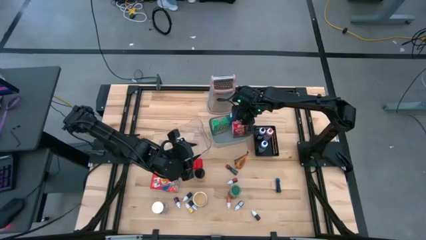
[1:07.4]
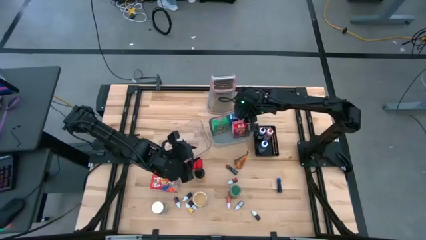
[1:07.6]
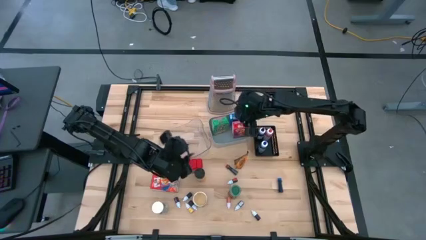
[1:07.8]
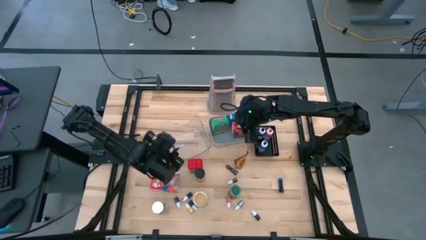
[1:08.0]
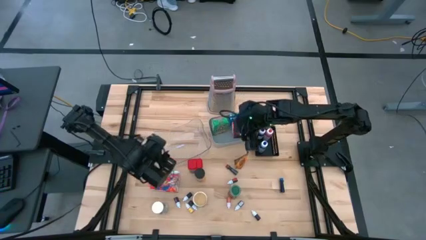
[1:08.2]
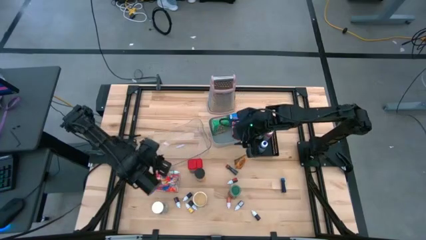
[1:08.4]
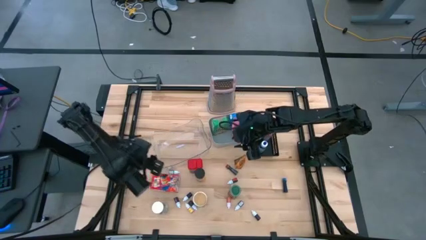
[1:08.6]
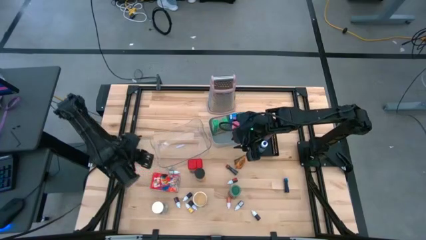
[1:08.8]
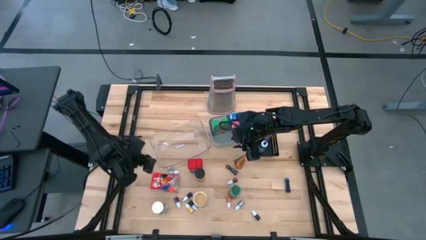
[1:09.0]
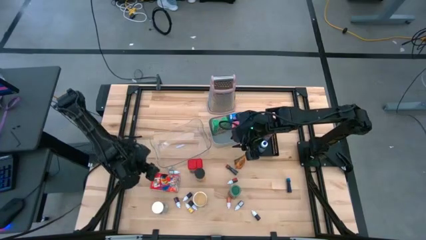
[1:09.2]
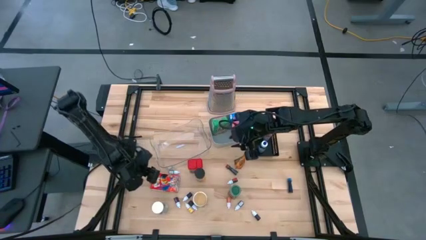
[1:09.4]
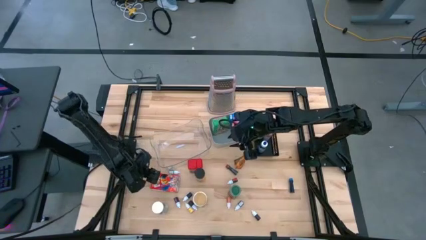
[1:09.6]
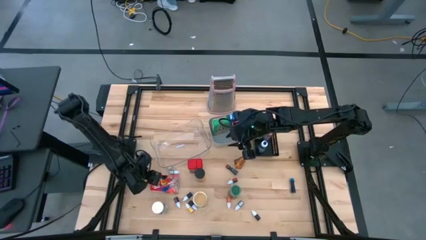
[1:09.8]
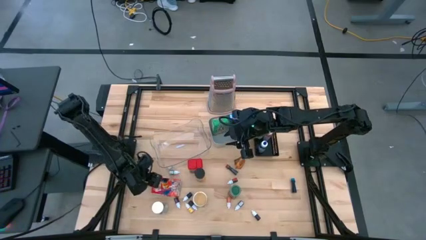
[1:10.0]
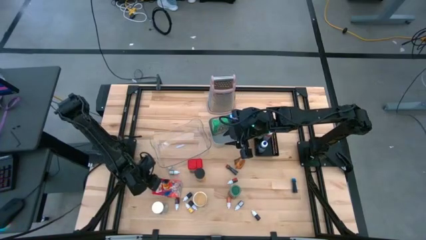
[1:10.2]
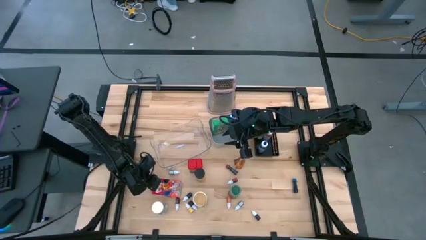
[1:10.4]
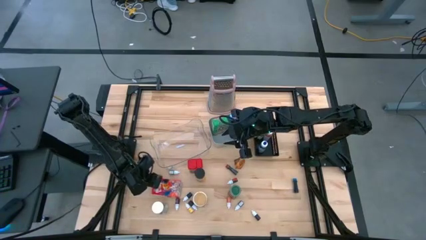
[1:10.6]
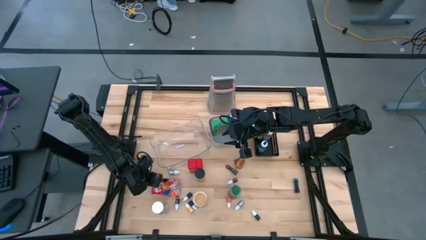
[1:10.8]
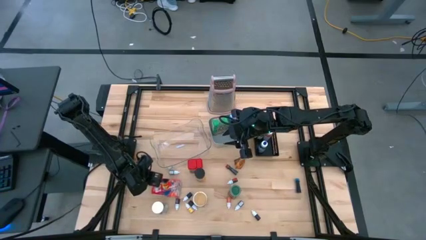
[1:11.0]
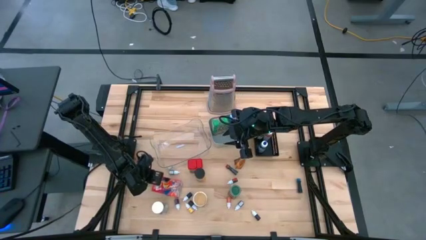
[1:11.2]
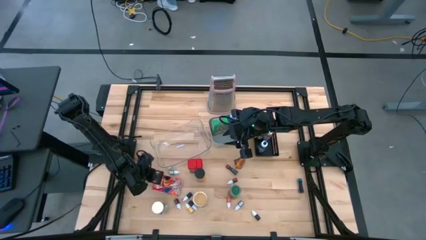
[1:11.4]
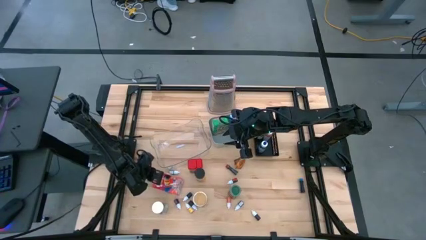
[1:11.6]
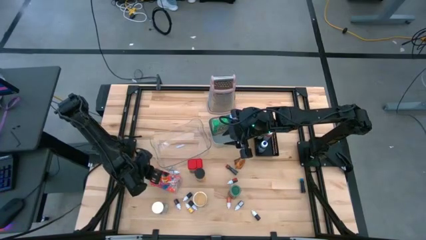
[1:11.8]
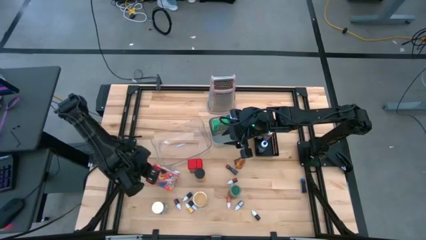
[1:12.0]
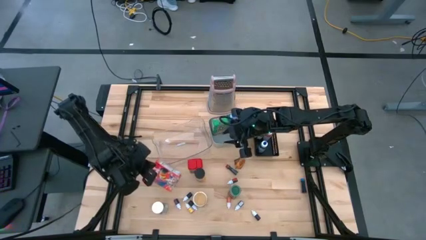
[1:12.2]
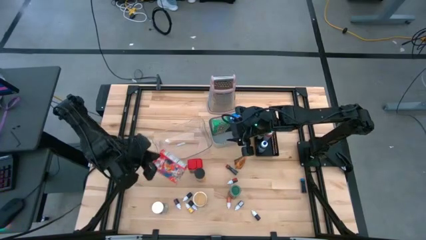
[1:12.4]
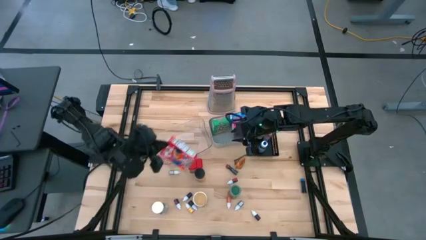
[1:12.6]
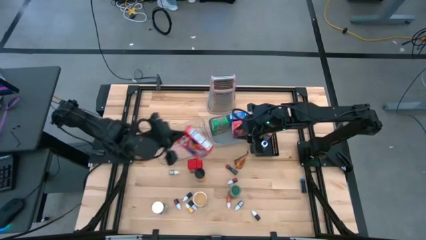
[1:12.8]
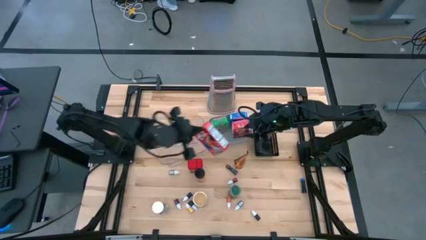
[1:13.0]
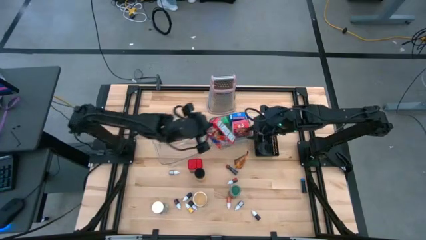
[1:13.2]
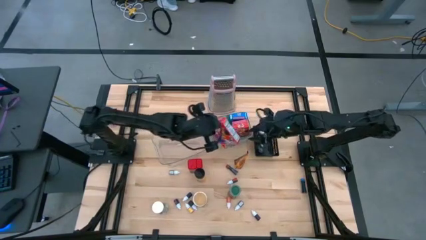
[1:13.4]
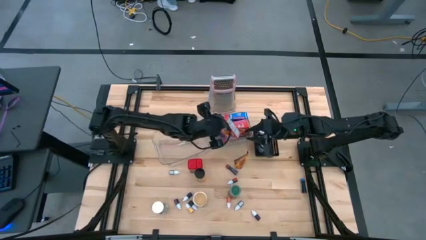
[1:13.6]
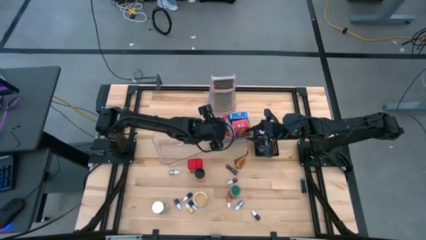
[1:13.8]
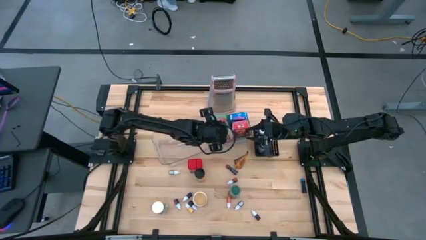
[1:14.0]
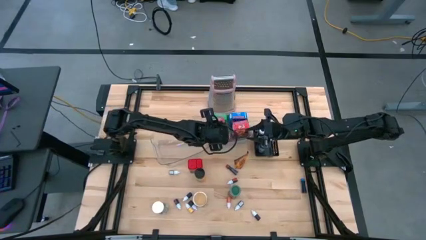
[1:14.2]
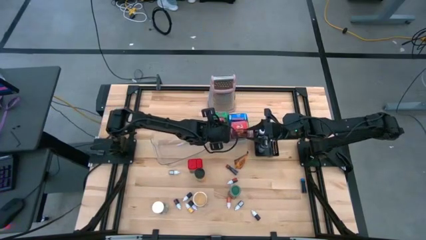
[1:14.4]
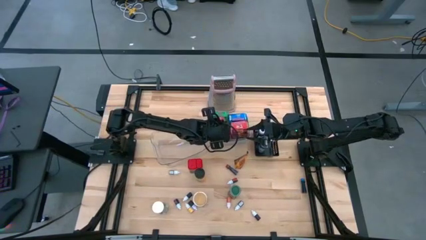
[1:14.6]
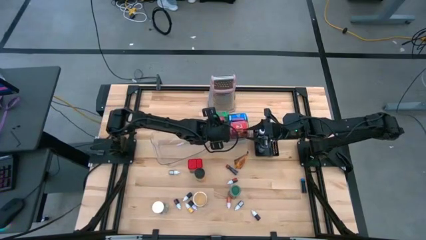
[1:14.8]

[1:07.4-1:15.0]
Task: Pick & Place Kitchen Items
Put the red cereal box into the gray bin

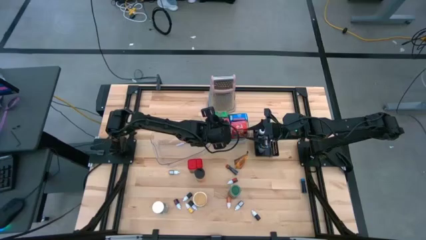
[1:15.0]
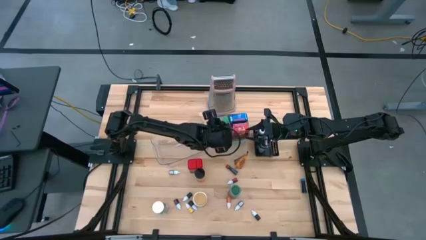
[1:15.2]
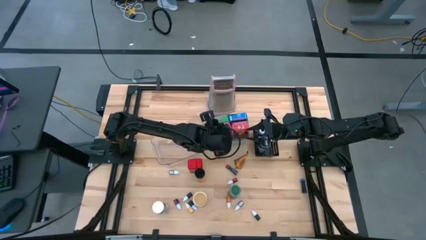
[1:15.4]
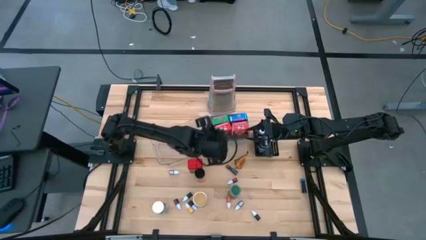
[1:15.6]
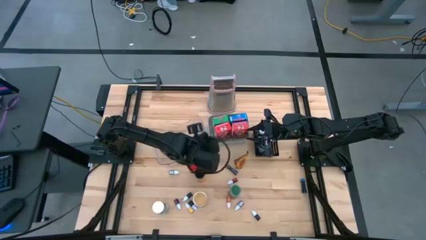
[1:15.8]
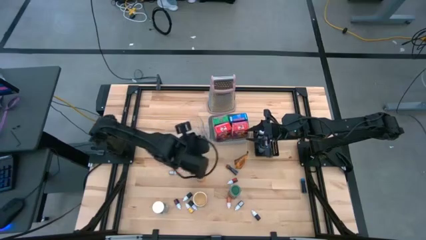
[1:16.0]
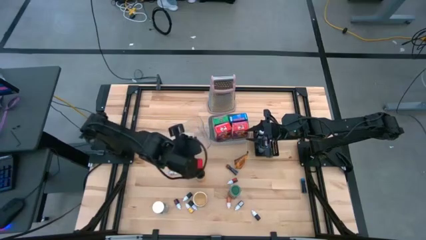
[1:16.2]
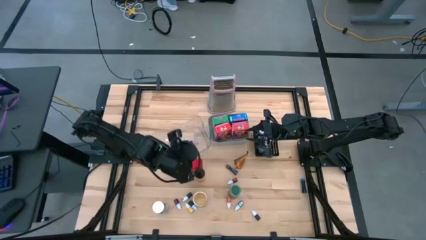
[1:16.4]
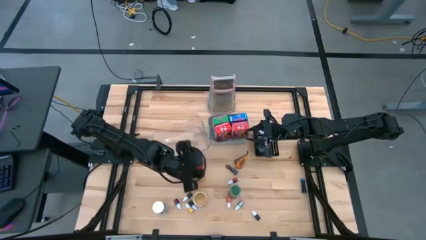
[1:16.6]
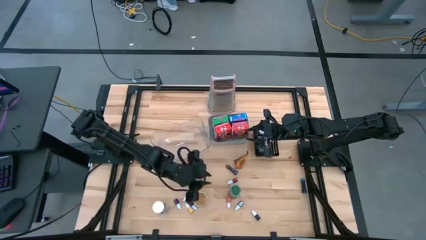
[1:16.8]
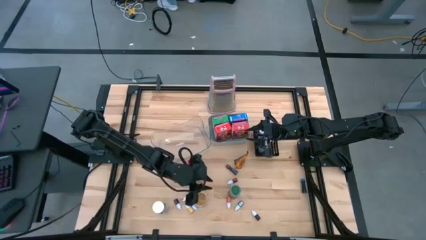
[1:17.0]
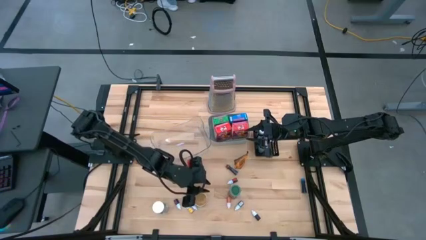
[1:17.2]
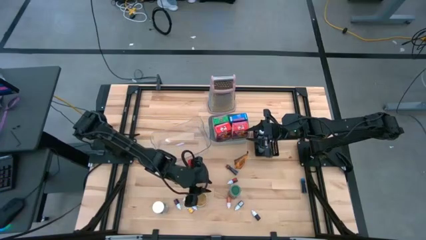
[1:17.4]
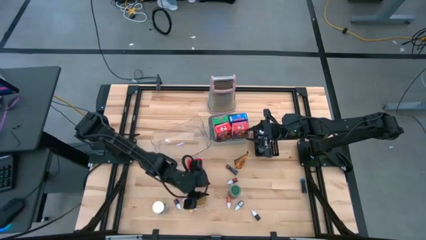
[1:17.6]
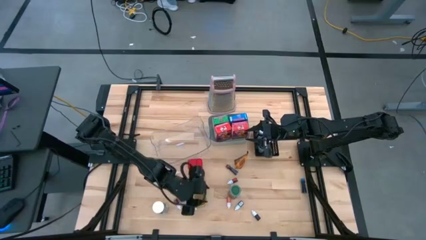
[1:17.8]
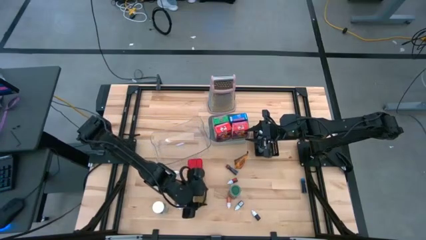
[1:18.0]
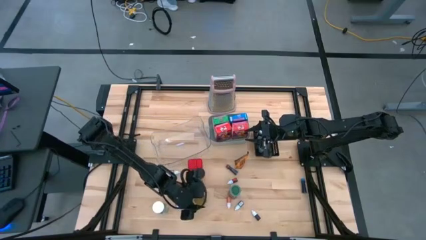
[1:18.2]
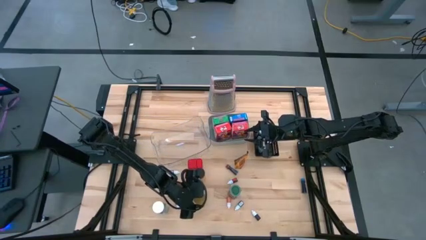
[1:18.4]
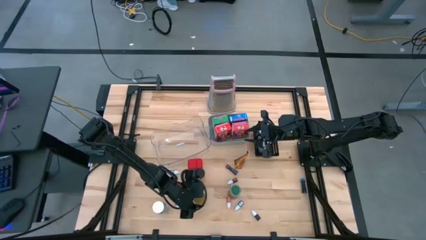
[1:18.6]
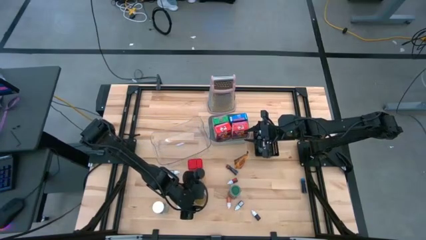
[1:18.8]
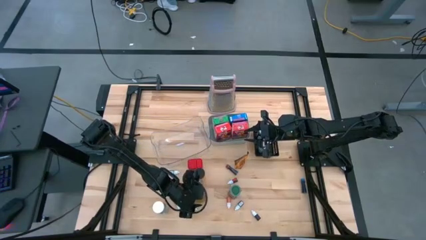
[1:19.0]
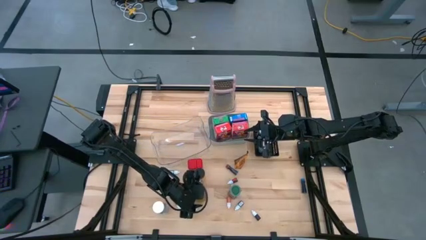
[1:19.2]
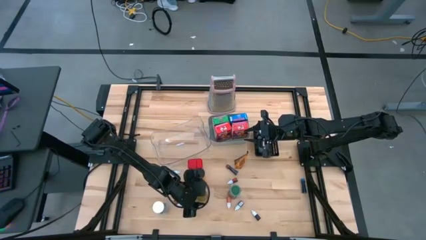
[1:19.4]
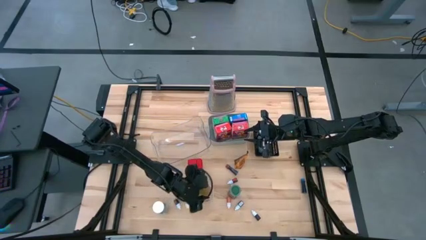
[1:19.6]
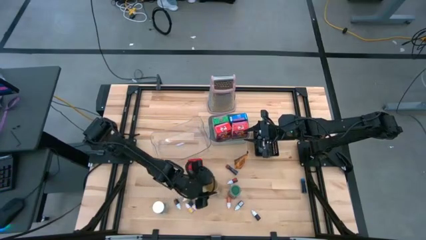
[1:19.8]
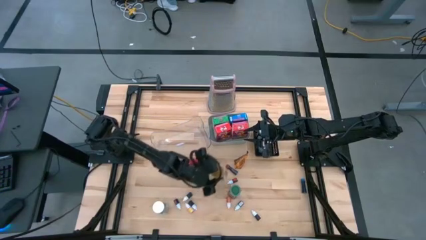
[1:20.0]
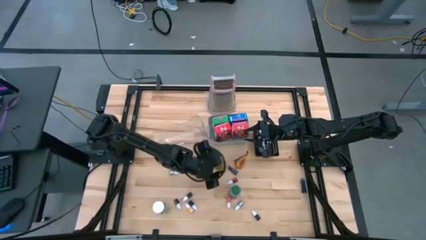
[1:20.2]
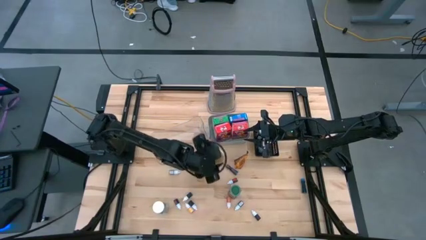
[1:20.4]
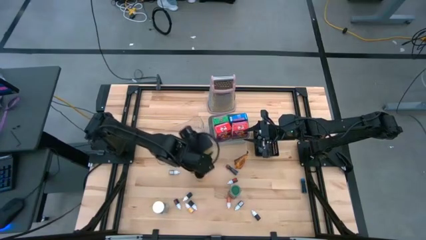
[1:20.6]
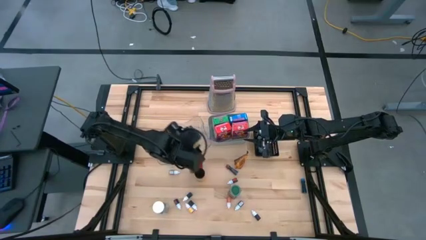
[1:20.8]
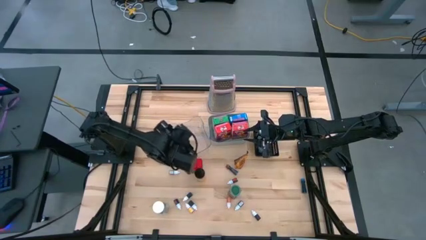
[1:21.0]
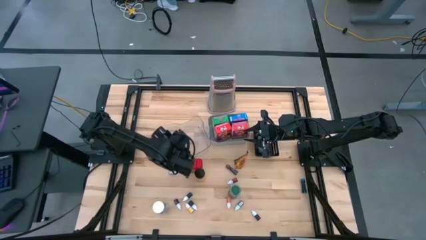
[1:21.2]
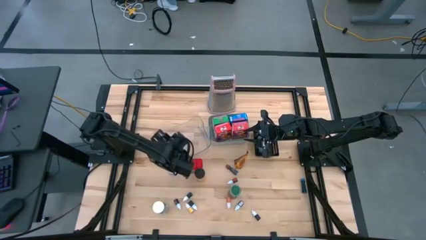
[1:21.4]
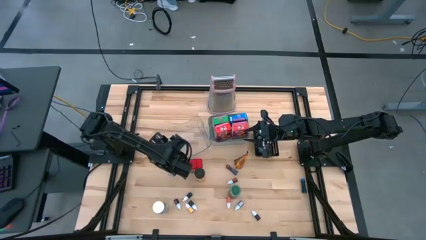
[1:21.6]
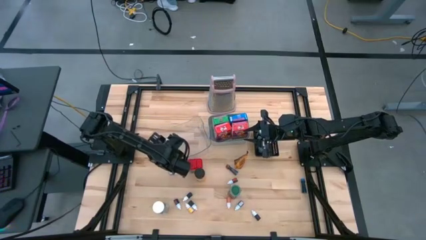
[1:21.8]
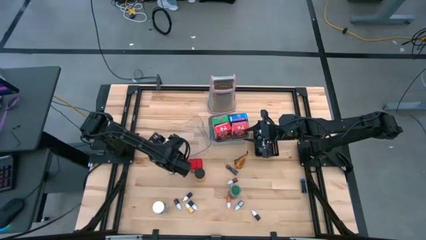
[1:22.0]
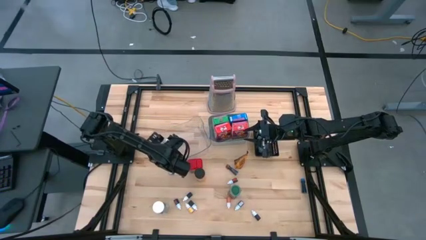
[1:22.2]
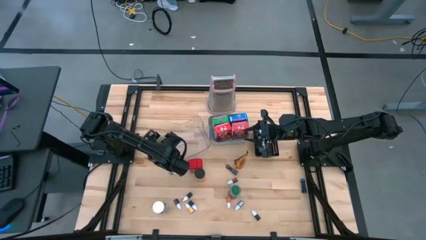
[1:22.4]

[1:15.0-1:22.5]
Put the golden seasoning bottle into the transparent bin
